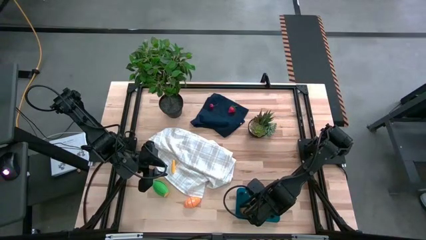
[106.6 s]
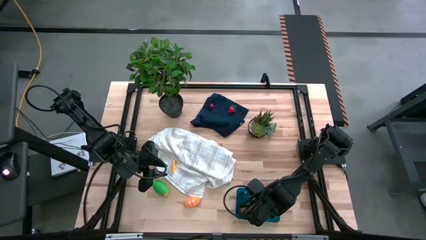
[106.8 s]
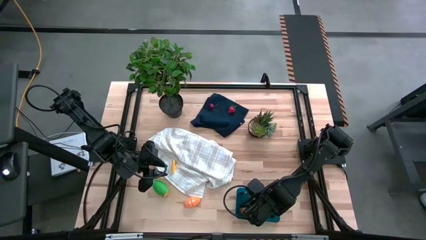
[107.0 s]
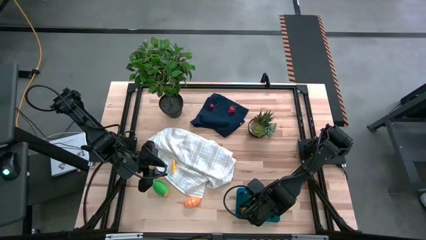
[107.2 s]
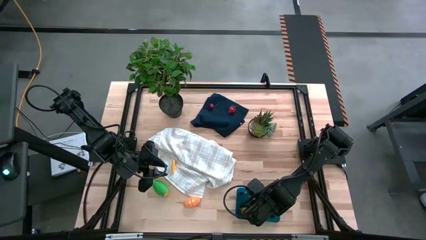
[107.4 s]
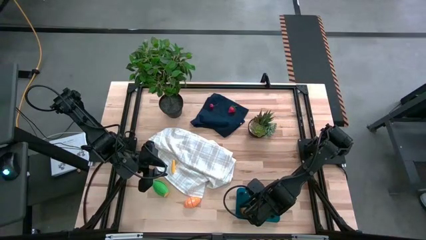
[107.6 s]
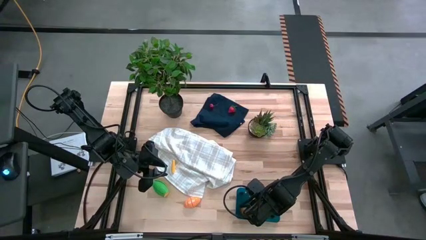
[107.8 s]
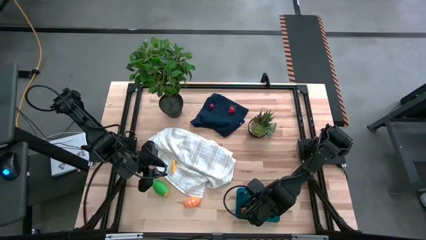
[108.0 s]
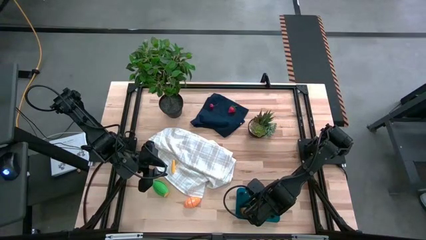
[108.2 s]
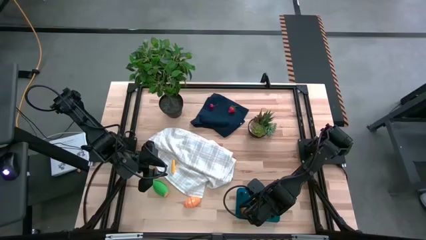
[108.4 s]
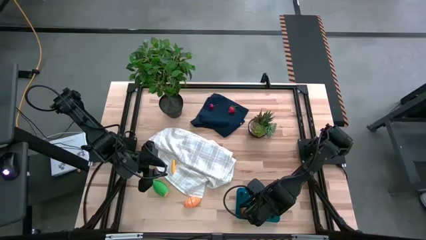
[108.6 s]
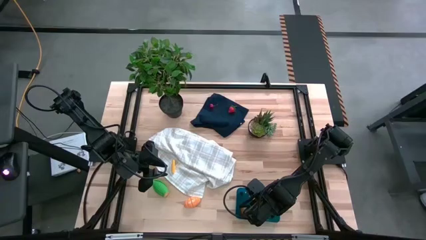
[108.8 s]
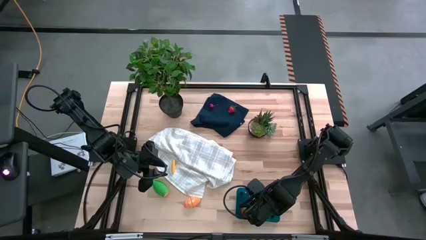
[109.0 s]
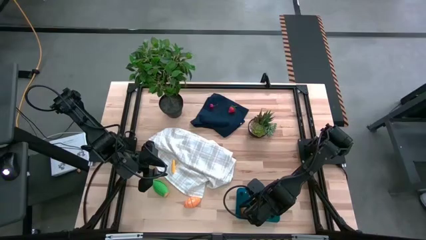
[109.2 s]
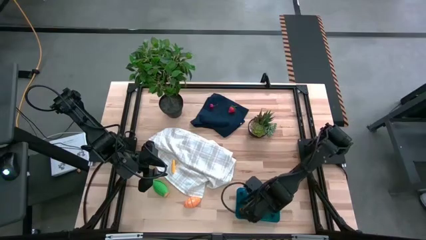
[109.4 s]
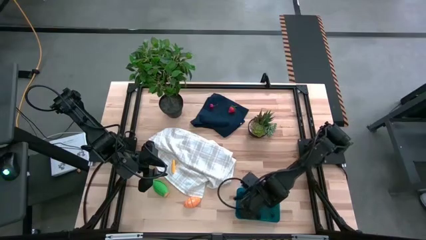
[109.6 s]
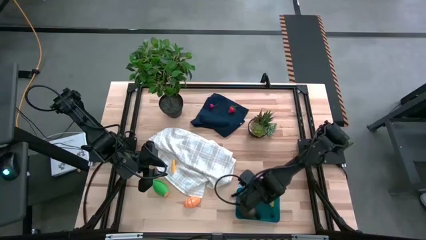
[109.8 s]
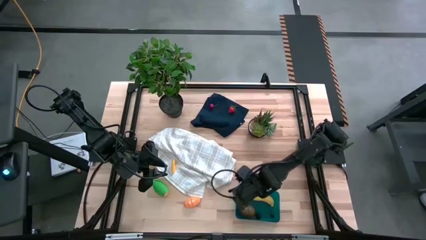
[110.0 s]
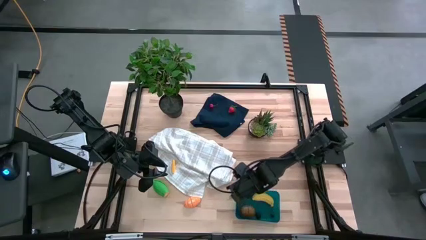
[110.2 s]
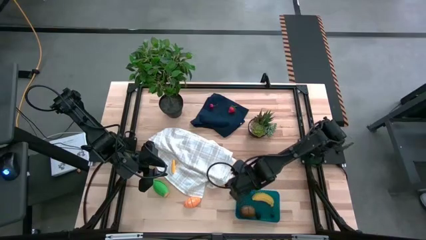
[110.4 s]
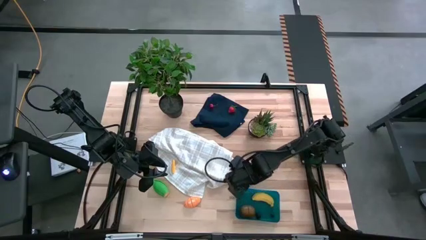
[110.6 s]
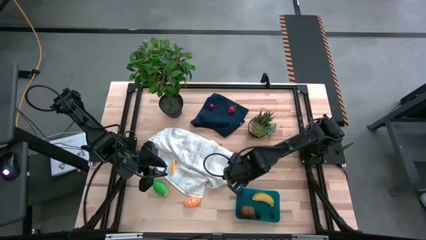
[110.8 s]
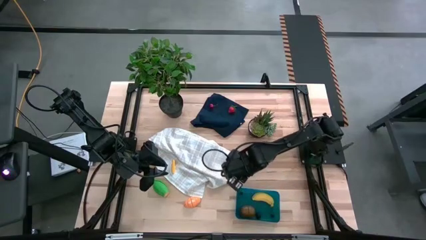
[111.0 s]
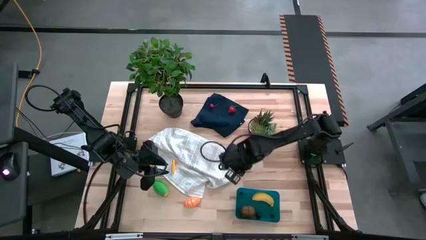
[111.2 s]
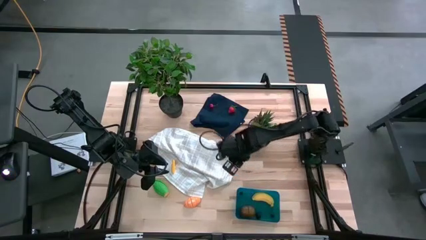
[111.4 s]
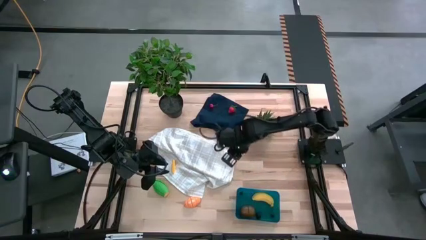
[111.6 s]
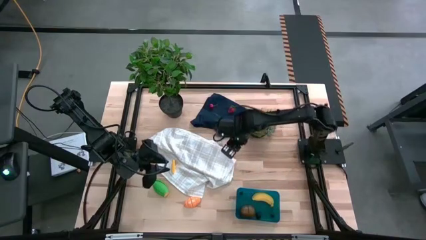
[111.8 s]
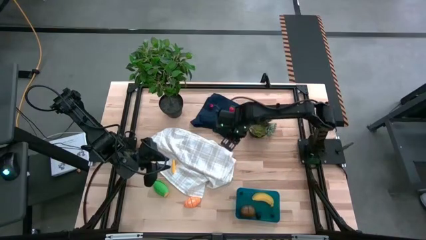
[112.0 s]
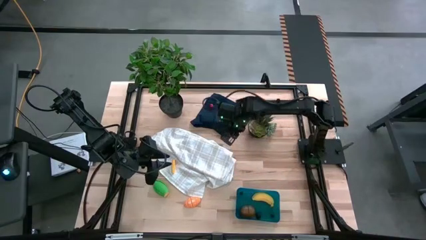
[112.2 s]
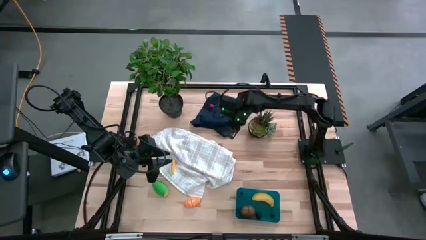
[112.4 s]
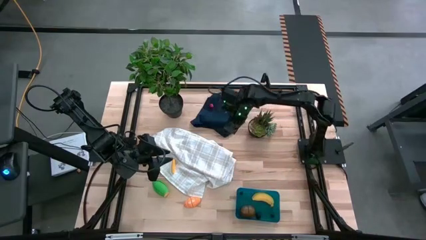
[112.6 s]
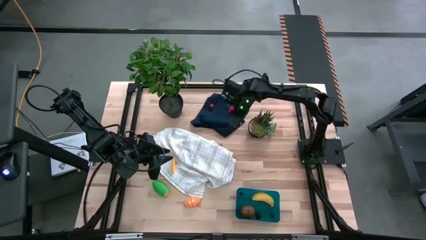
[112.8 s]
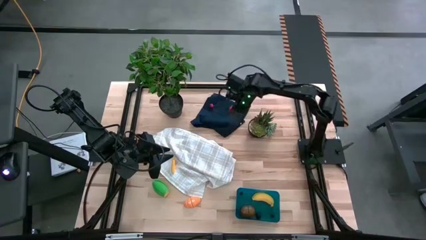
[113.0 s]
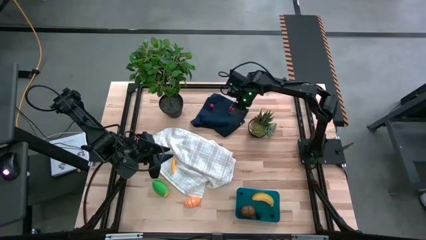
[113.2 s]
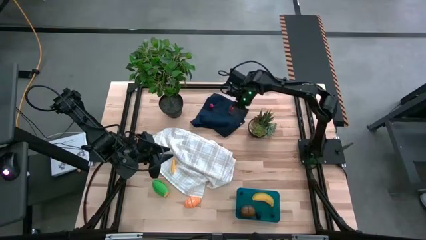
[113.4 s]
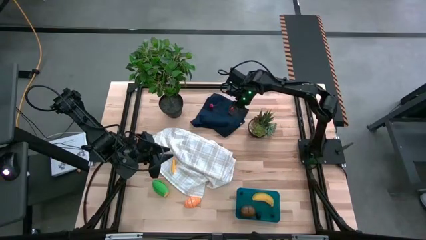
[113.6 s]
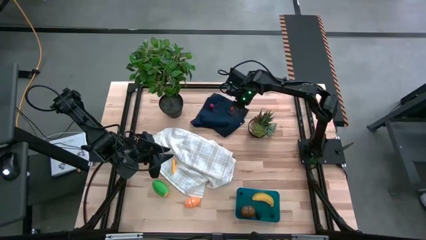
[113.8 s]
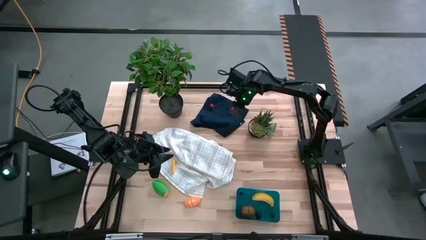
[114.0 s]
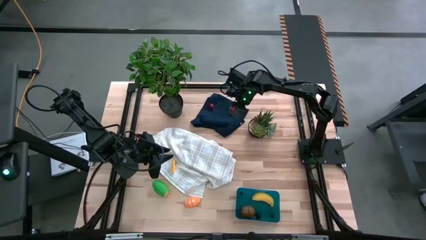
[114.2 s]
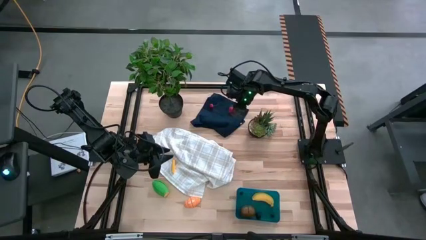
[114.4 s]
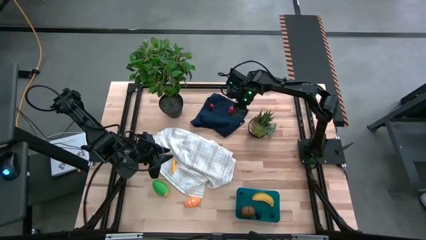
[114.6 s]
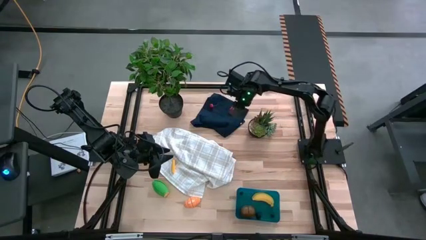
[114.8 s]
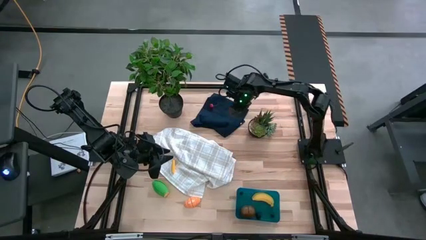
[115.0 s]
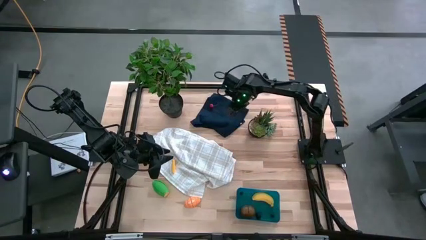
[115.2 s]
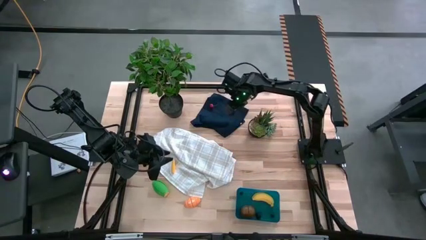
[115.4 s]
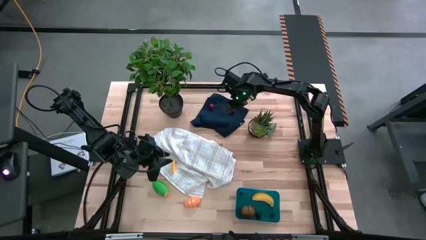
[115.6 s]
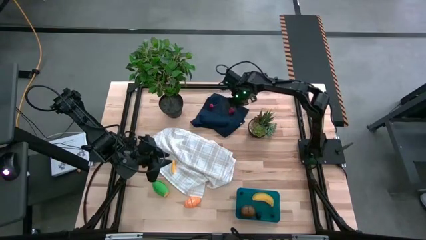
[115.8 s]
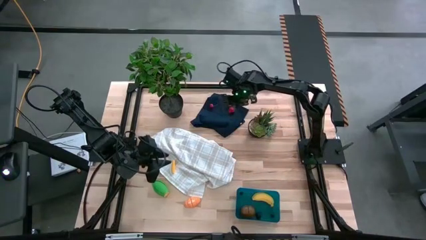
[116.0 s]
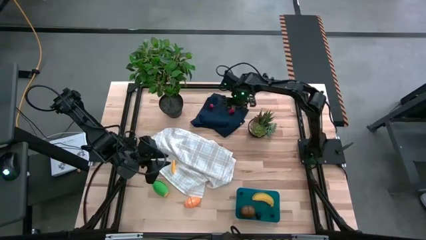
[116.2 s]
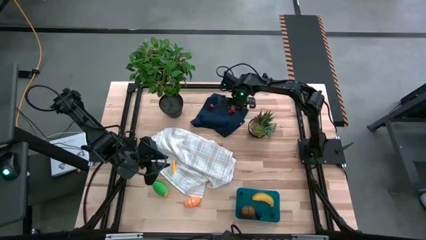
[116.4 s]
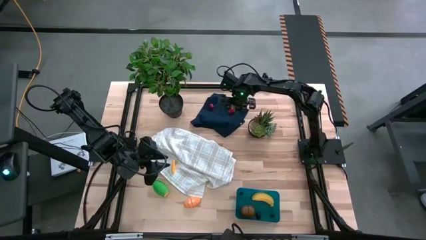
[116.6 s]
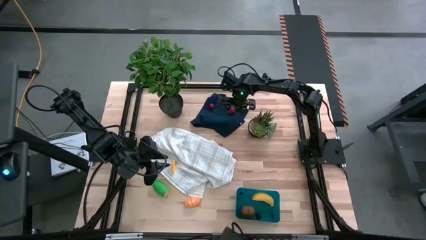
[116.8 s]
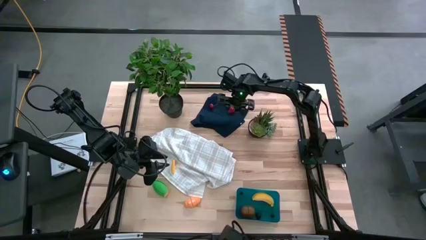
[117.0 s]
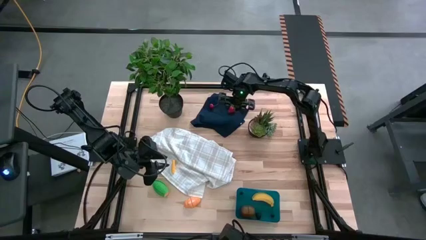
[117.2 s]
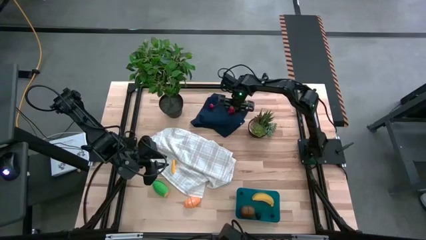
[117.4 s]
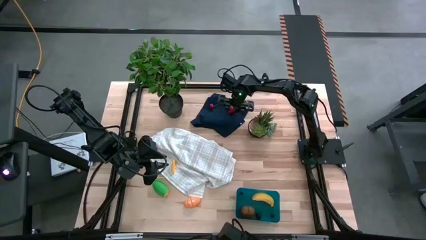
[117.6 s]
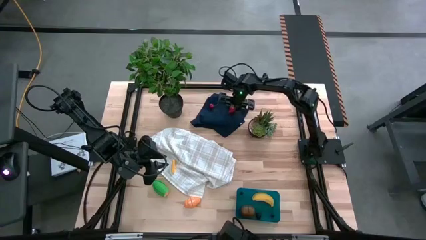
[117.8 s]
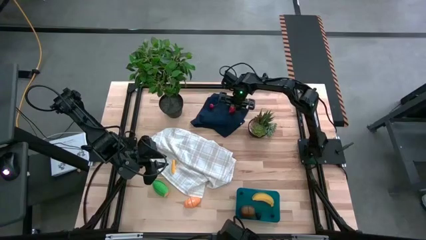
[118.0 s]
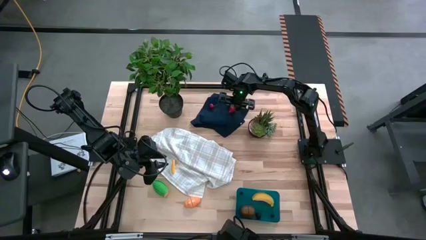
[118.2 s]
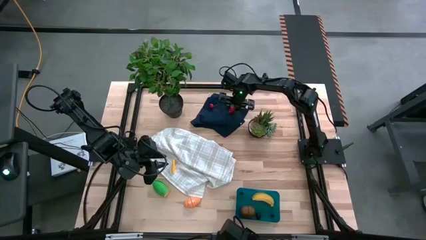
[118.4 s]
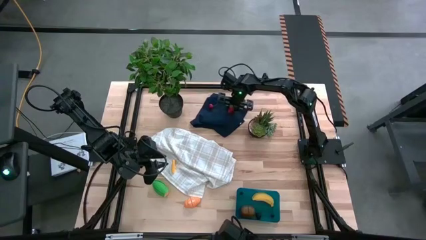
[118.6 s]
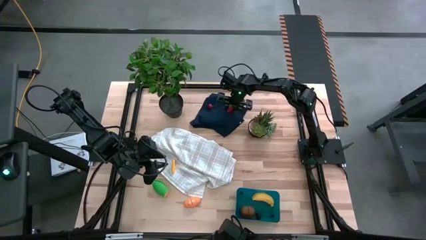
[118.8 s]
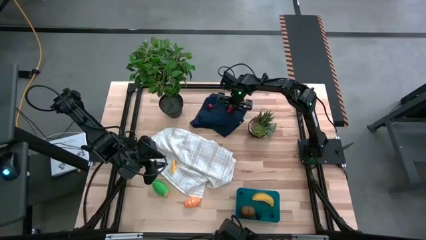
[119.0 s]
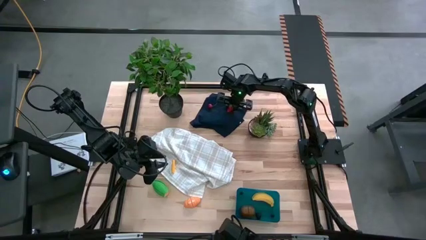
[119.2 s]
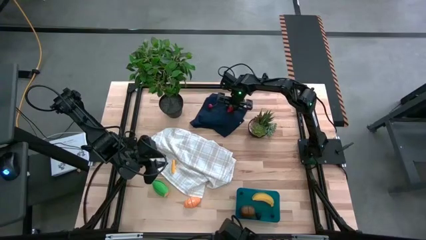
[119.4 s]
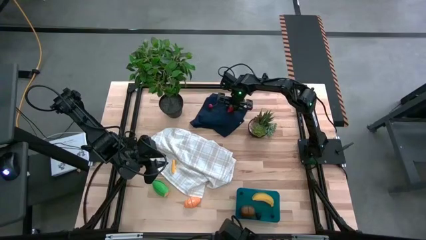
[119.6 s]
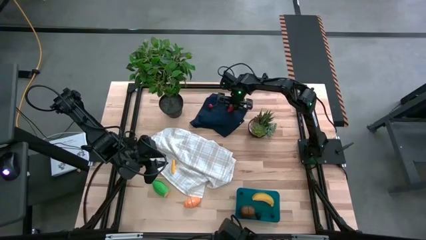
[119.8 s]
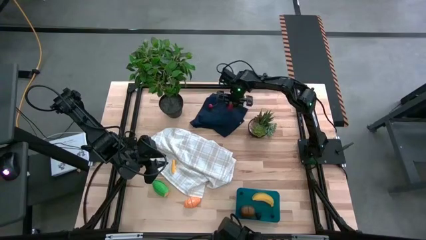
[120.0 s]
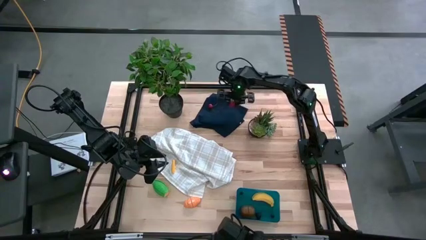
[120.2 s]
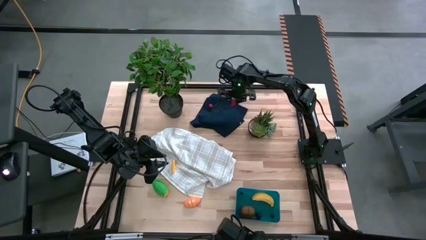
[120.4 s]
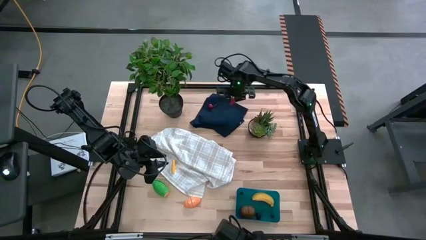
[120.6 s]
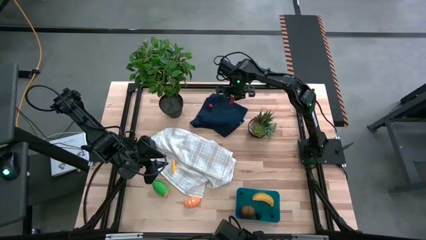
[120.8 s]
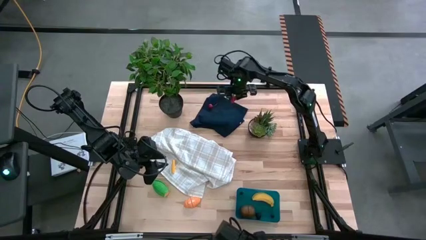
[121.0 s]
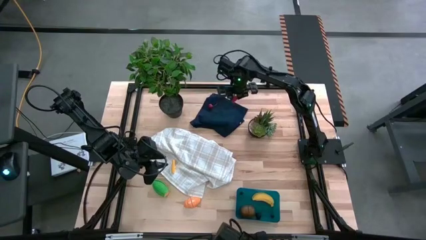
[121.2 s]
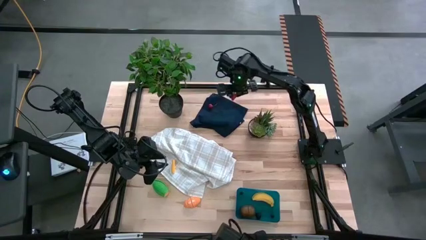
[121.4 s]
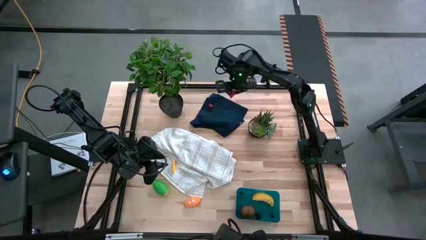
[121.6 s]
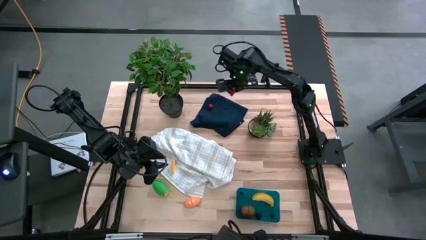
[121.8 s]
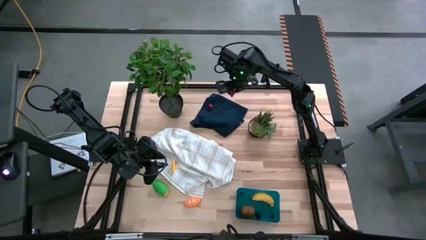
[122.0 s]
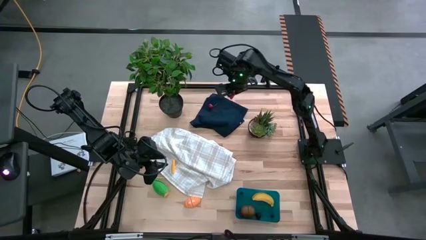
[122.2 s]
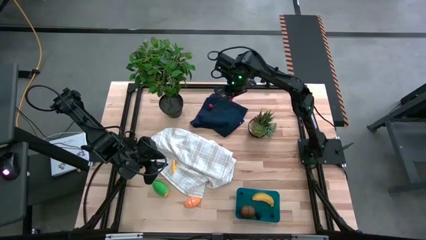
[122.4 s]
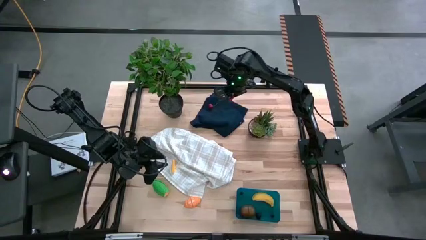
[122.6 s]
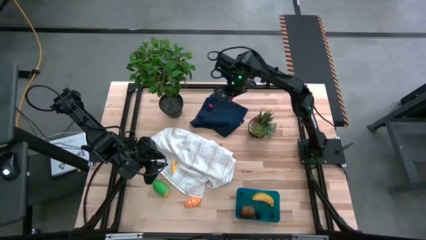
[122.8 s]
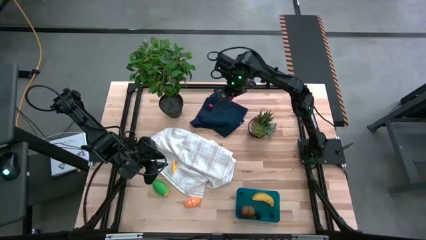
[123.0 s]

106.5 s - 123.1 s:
Task: Pick and placing Produce into tupperware
Put the strawberry into the bin

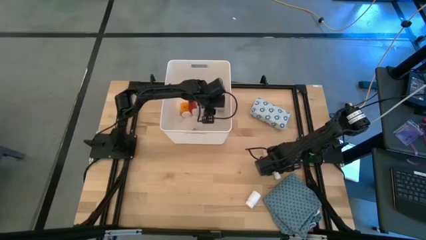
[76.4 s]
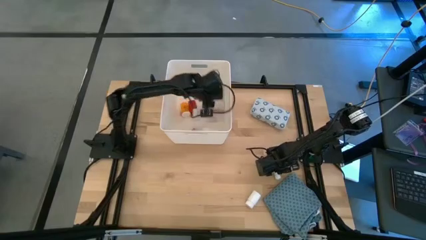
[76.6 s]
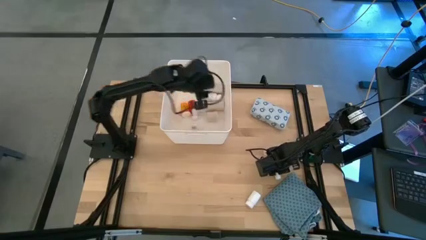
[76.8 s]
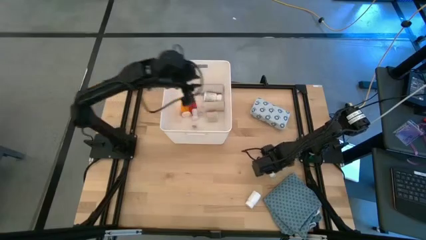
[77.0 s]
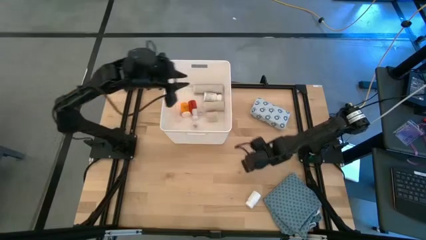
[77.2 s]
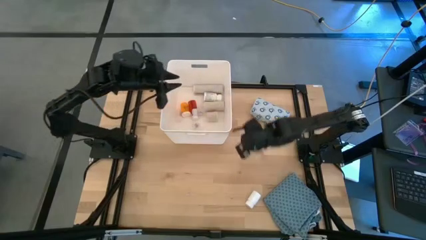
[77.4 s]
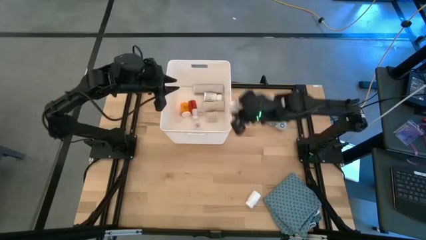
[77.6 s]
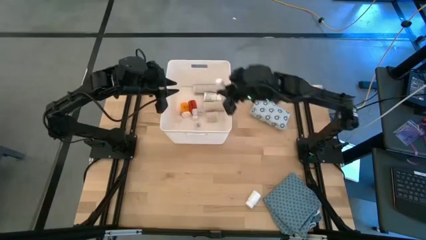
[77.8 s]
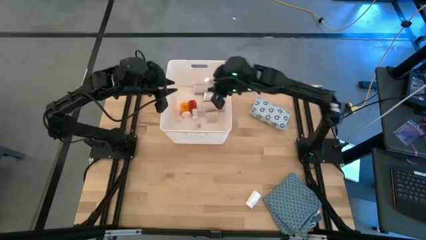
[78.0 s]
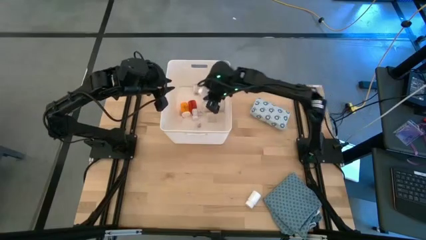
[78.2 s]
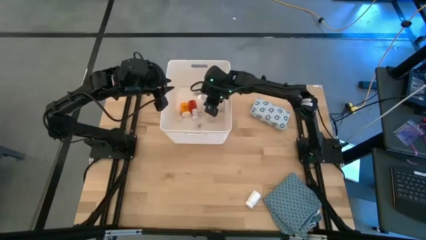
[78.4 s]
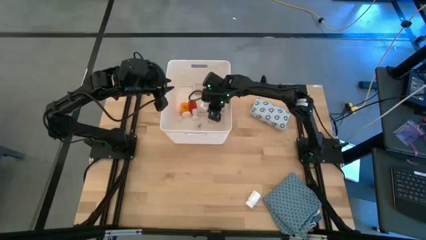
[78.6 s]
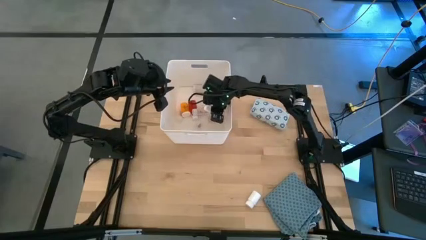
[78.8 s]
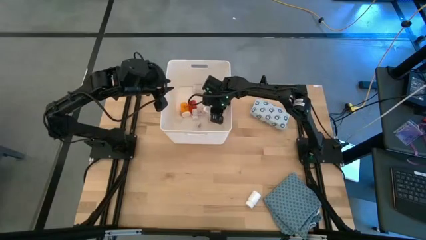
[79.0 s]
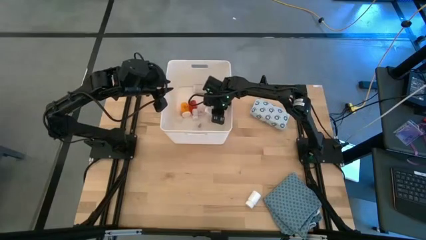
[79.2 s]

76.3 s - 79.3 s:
Task: Pick & place medical supplies in basket/bin
Put the white gauze into the white bin
